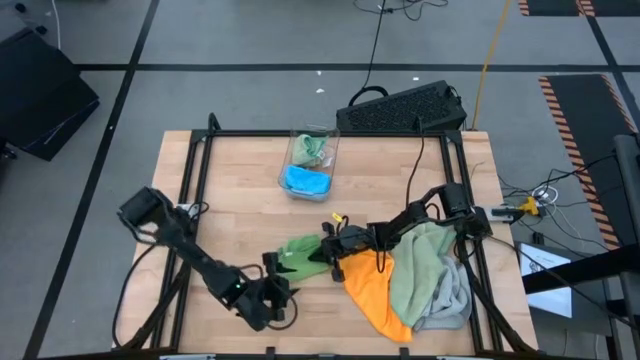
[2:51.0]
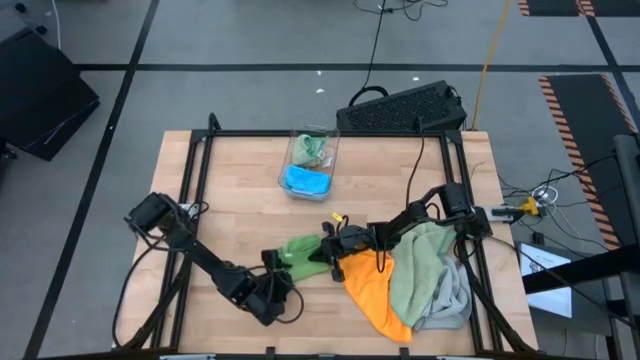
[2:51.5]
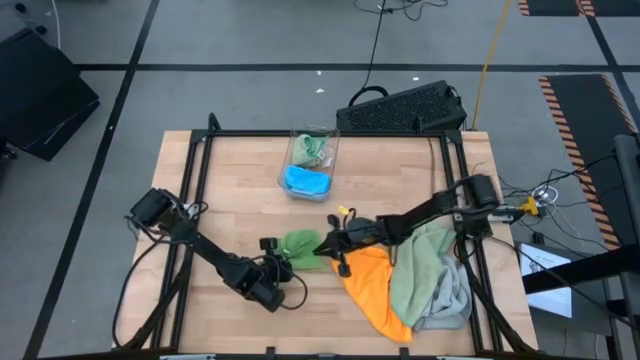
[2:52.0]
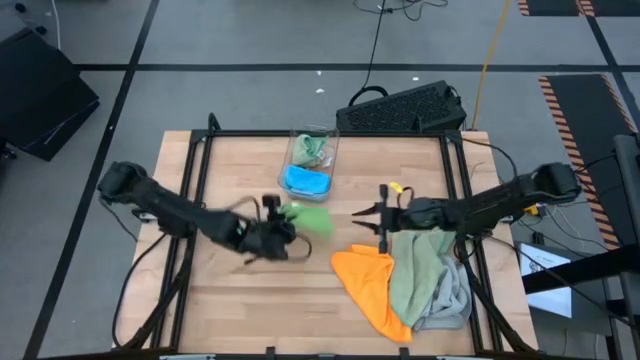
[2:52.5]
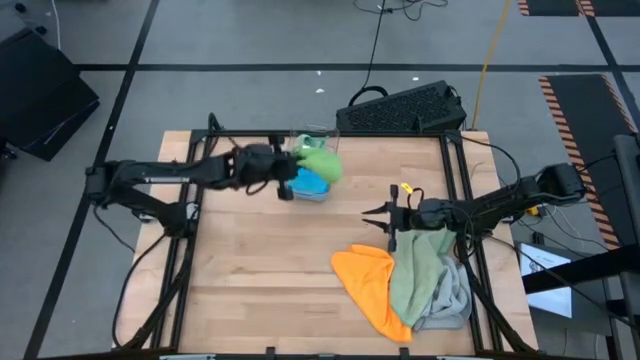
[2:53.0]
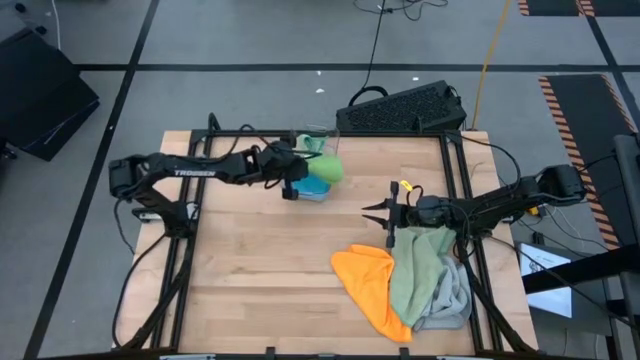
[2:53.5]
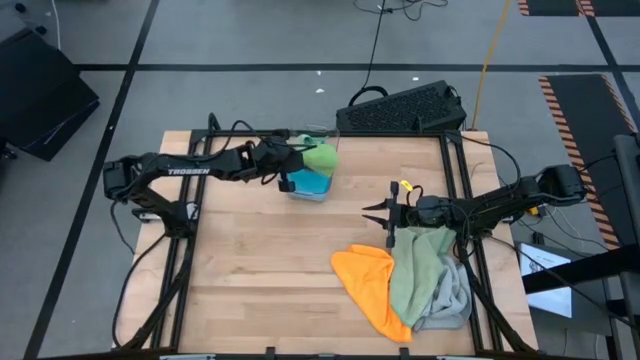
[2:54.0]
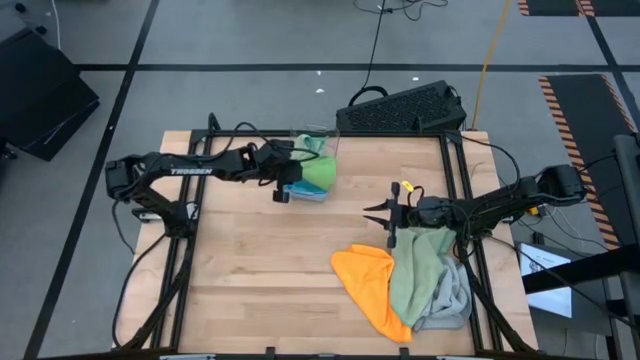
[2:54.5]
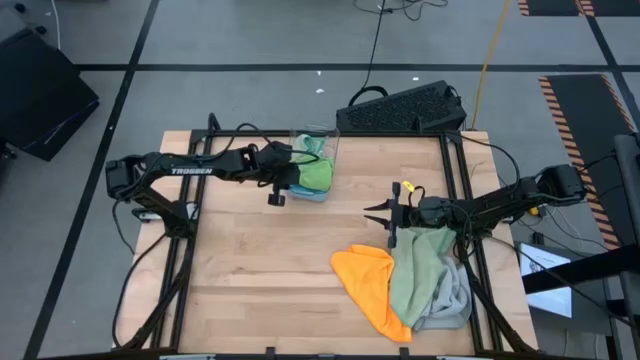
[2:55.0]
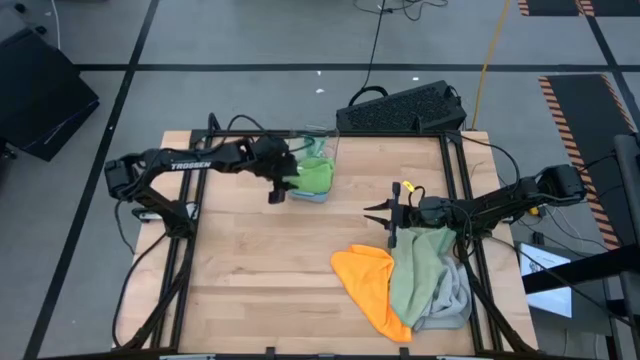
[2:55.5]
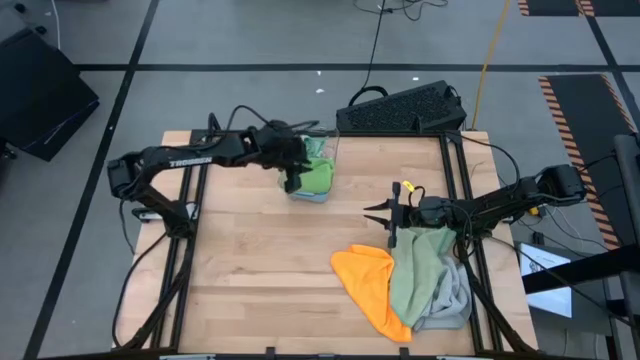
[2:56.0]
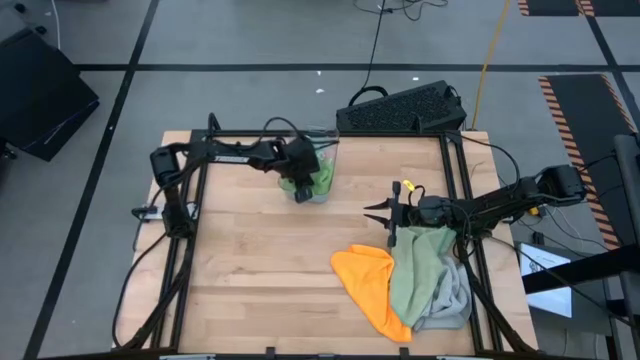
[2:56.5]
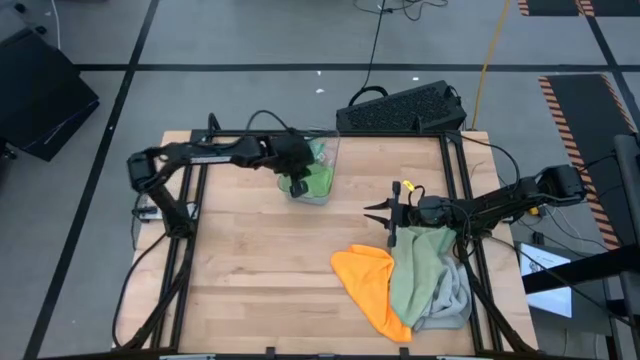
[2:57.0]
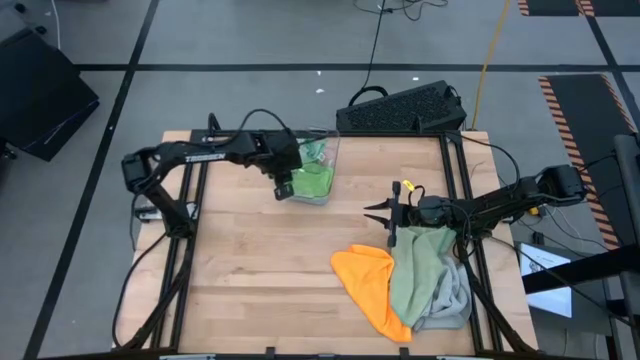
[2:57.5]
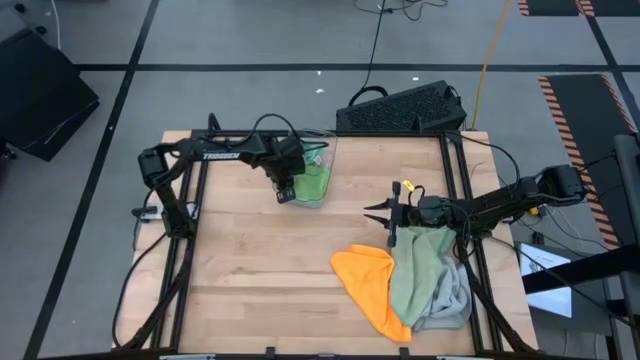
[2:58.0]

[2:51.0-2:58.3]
Task: Fold microfiber towels
Put the folded green towel into the transparent bin

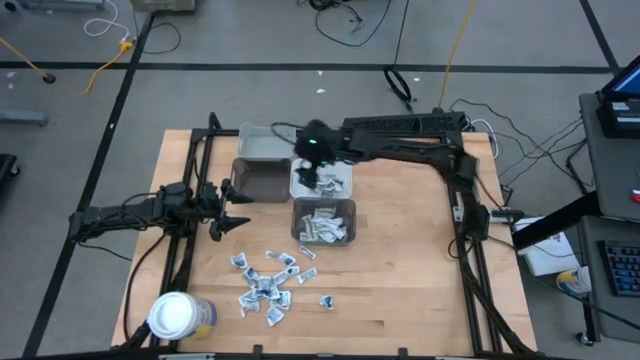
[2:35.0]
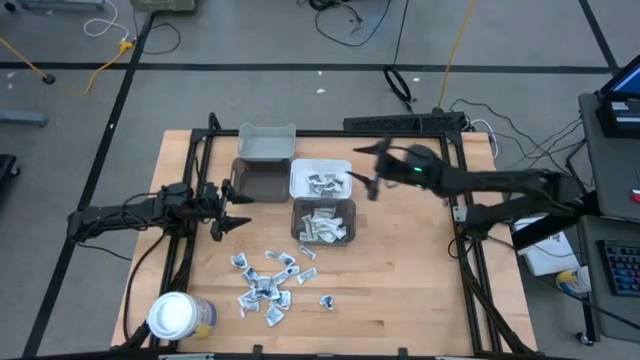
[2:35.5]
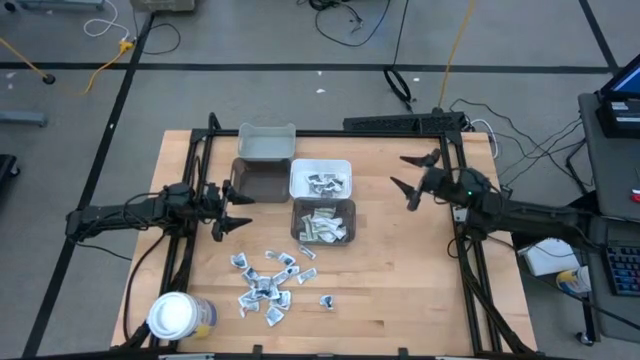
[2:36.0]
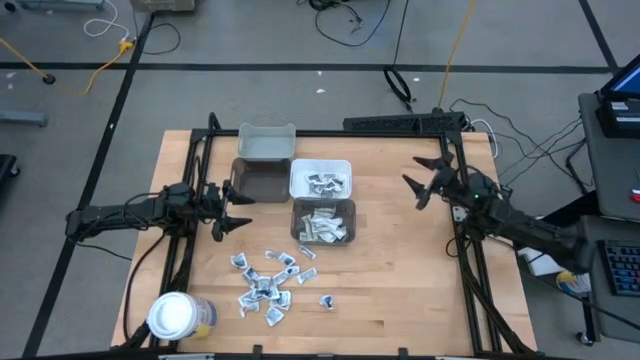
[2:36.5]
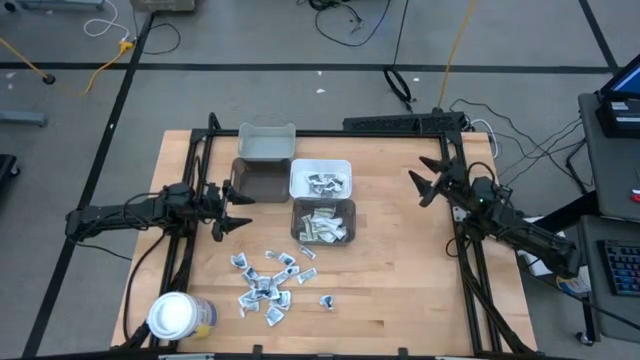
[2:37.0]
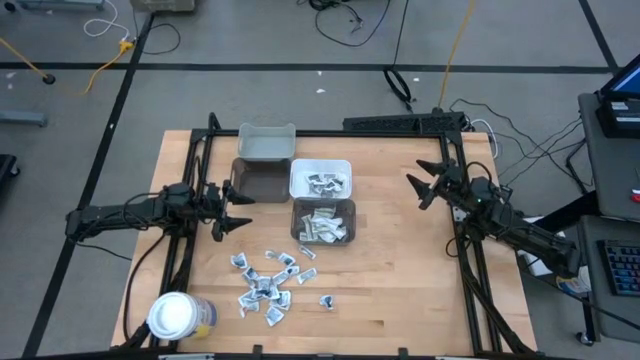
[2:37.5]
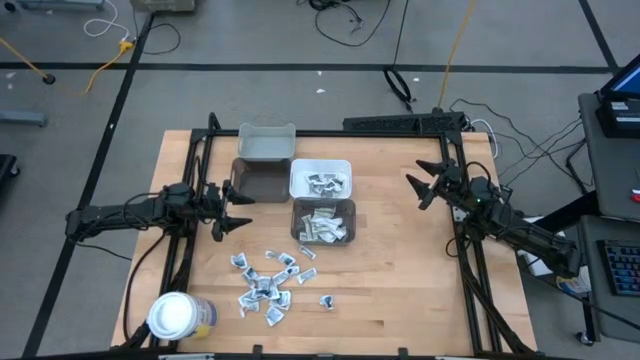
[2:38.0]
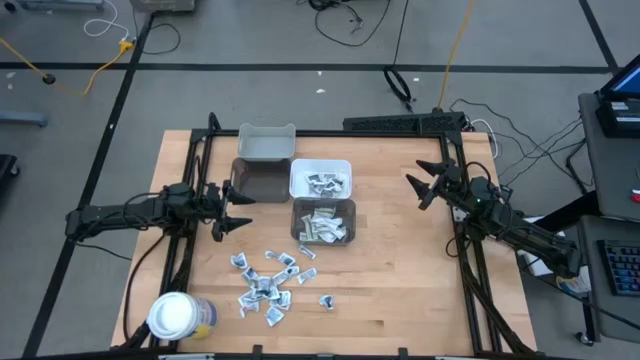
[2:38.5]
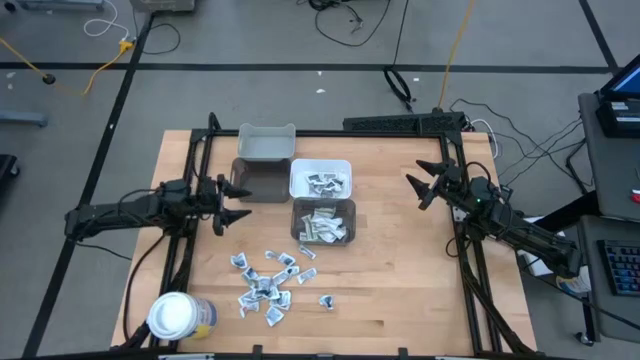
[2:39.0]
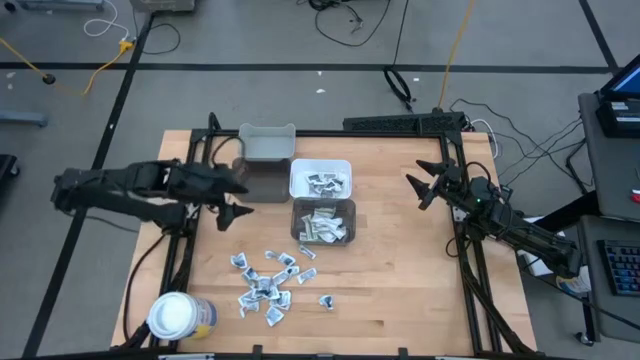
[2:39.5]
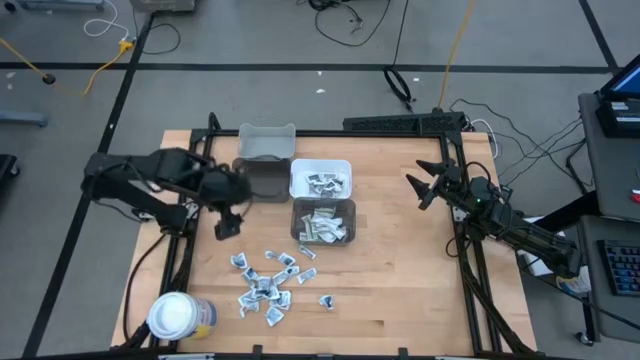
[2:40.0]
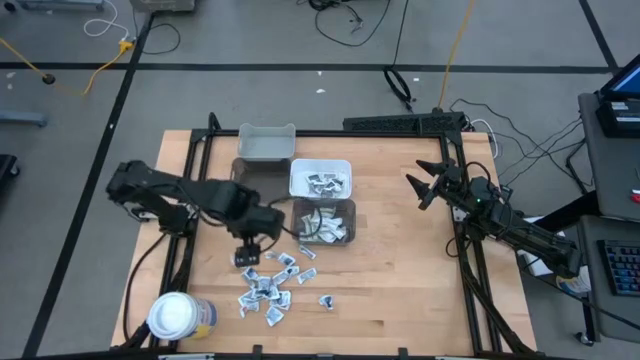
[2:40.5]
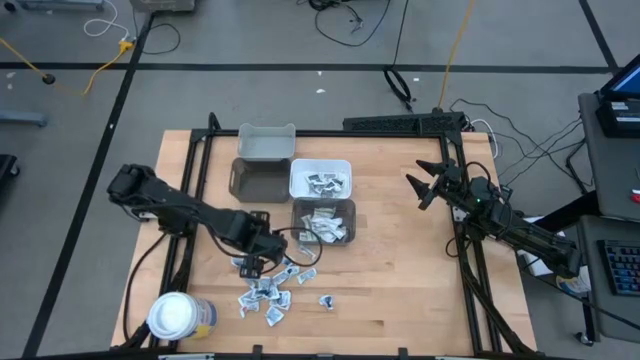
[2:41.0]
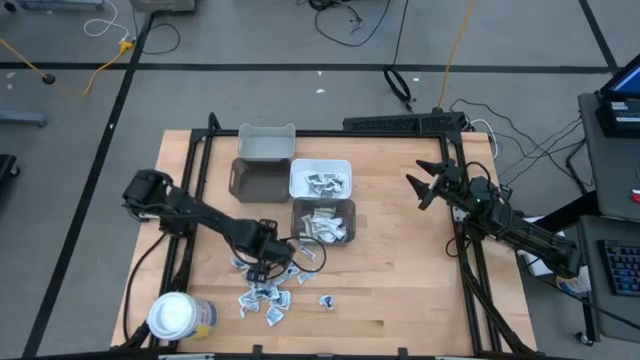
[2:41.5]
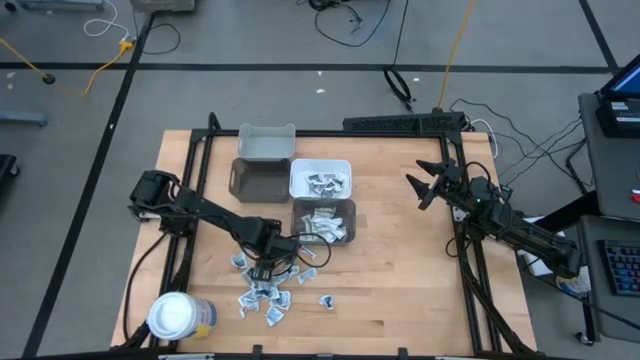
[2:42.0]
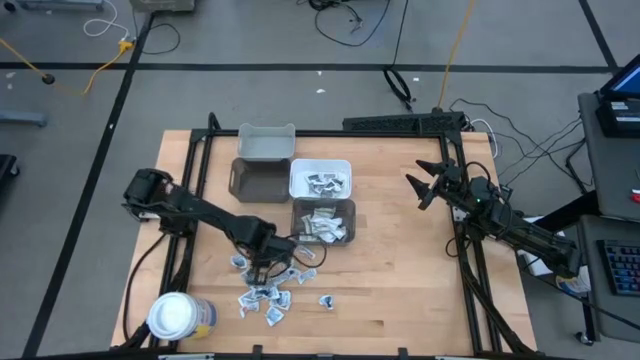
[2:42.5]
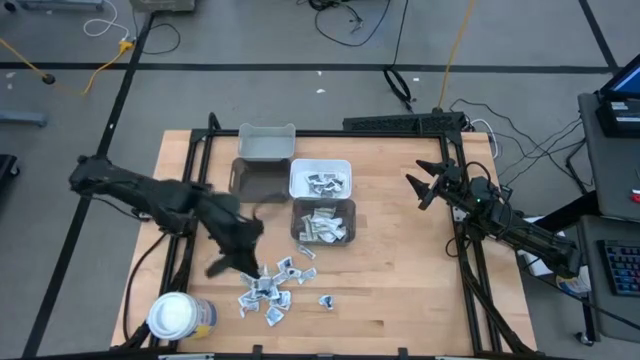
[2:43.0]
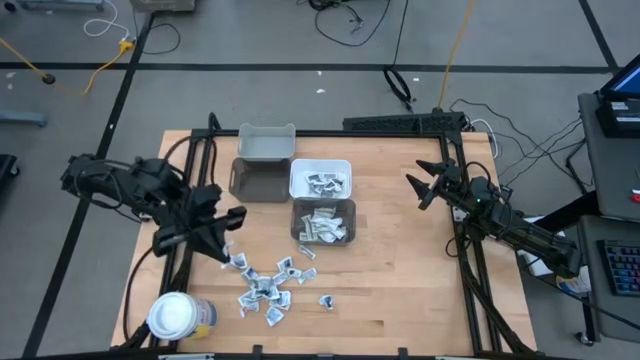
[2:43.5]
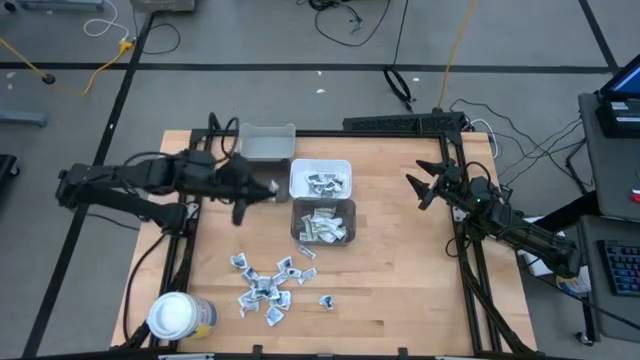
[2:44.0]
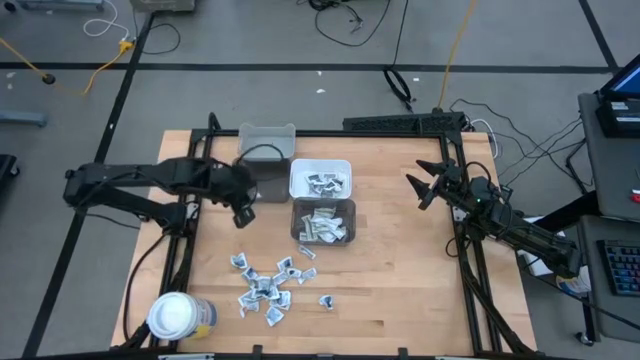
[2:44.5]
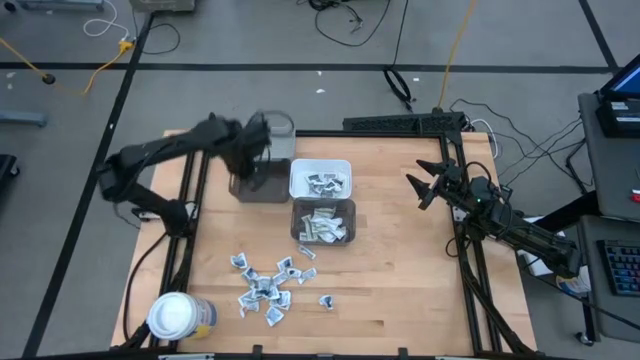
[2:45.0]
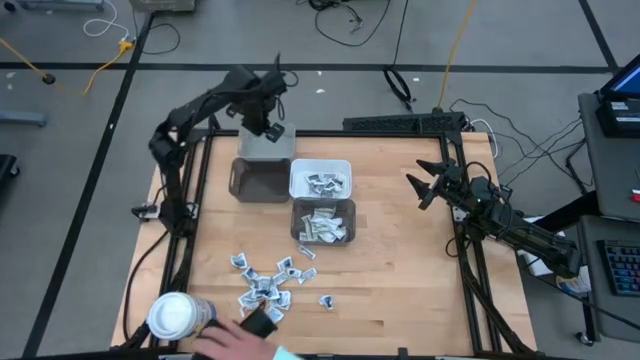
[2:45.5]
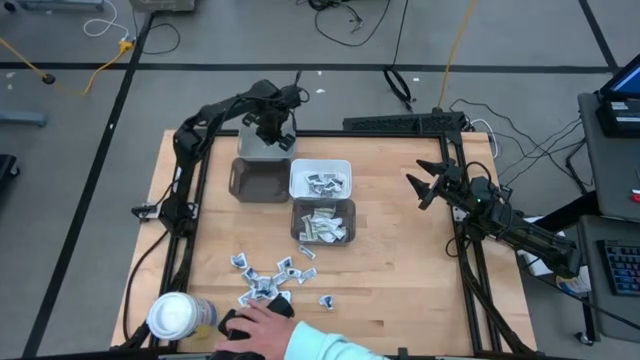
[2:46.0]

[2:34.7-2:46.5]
Task: Pick & Place First Aid Supplies
Put the orange ointment pack into the gray bin
